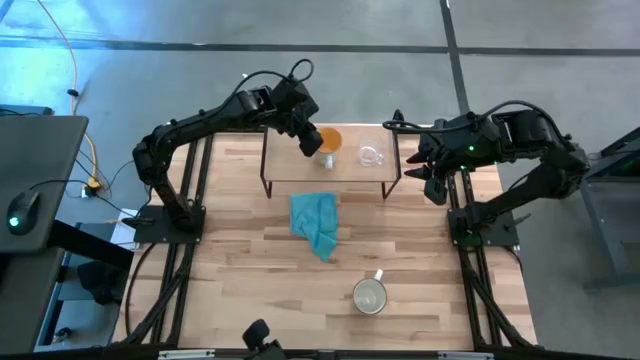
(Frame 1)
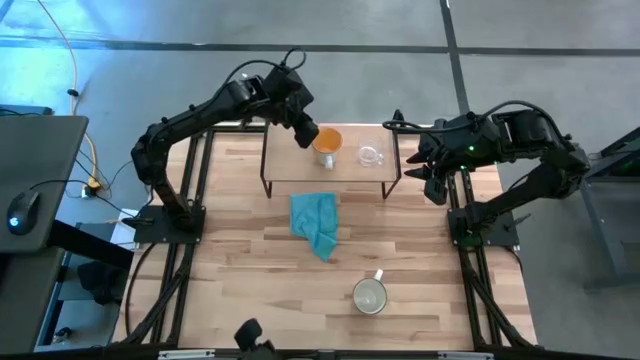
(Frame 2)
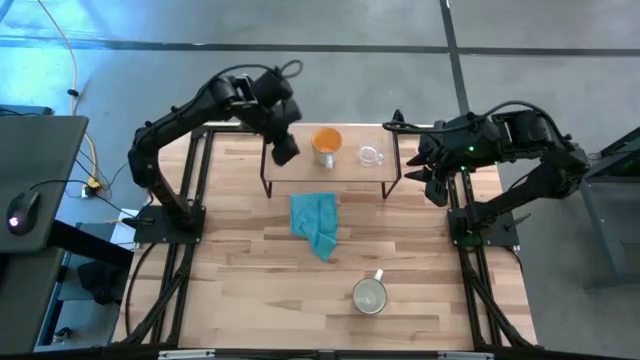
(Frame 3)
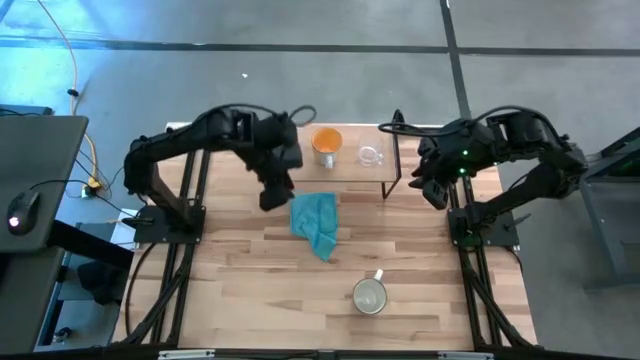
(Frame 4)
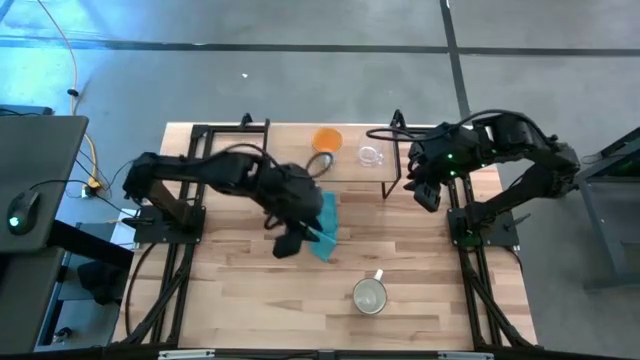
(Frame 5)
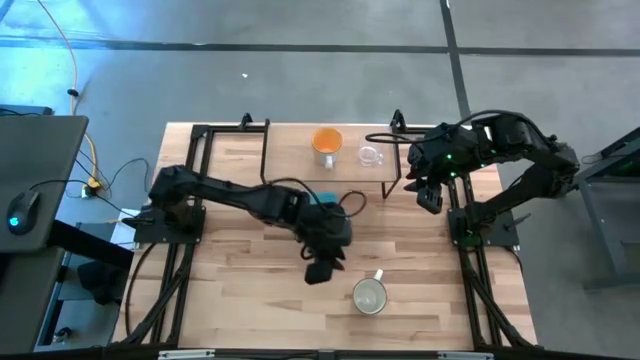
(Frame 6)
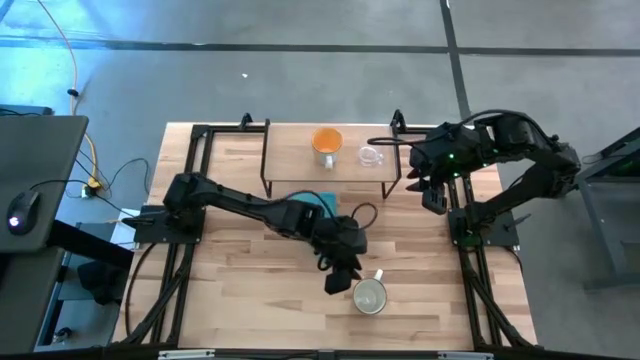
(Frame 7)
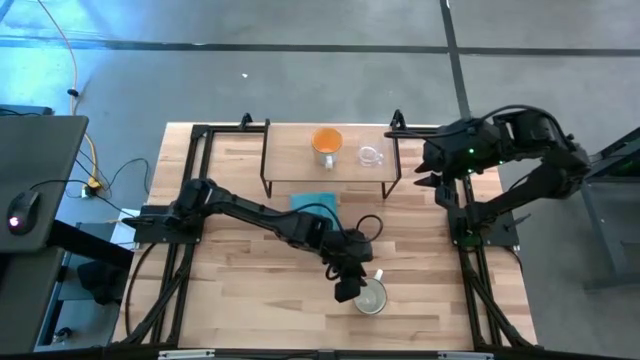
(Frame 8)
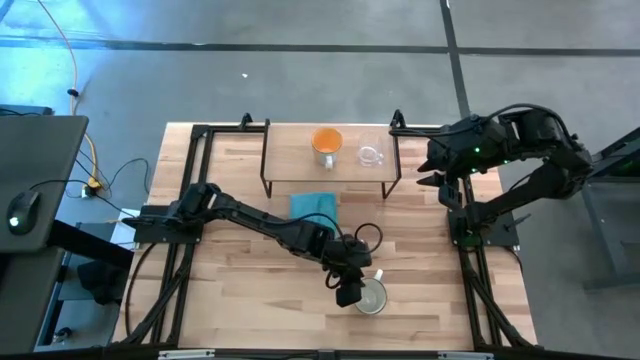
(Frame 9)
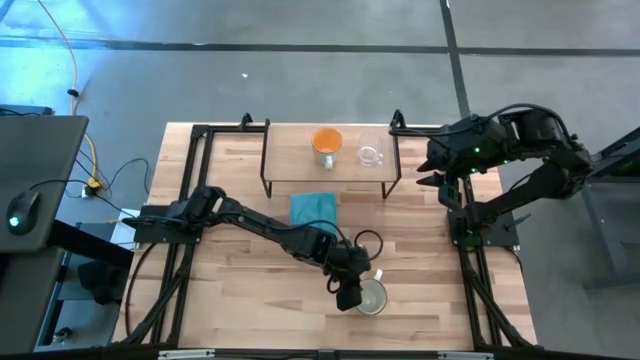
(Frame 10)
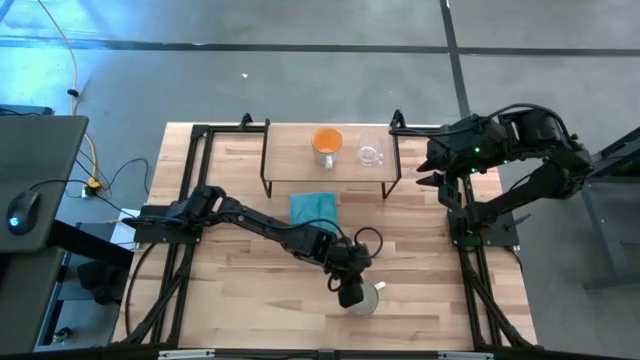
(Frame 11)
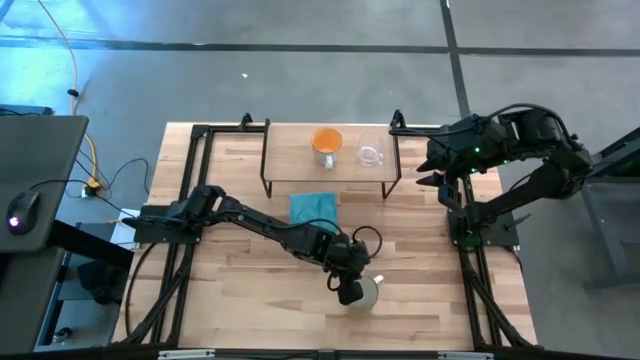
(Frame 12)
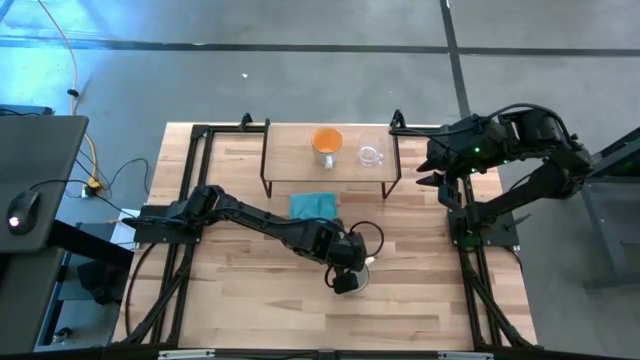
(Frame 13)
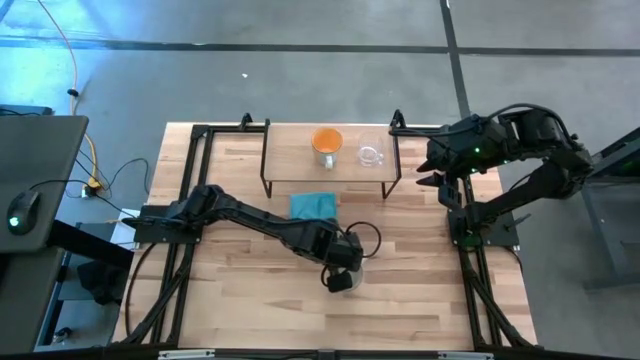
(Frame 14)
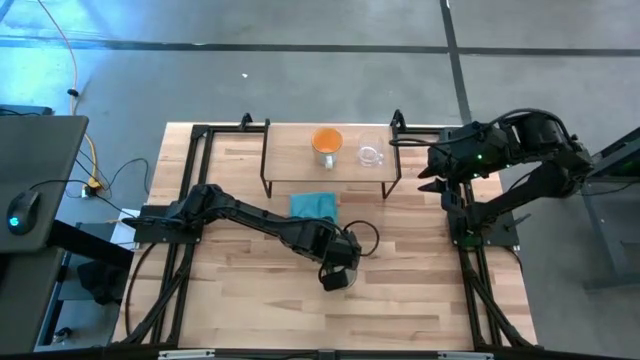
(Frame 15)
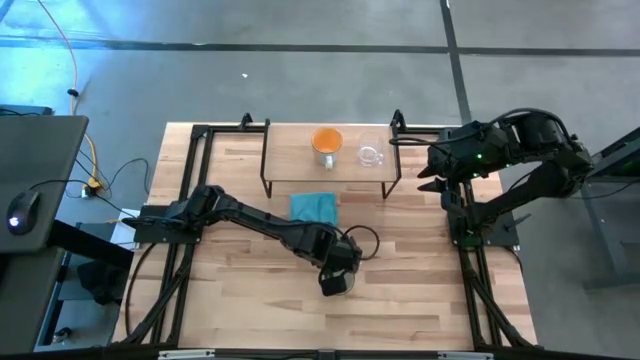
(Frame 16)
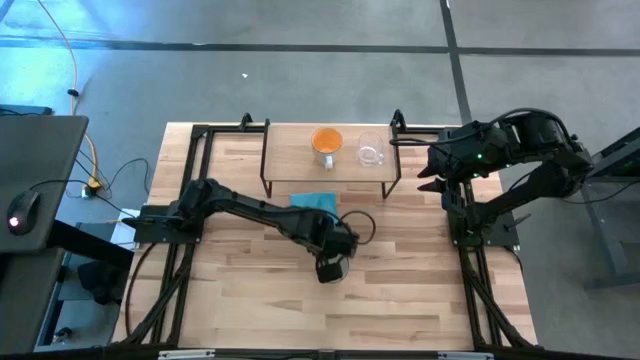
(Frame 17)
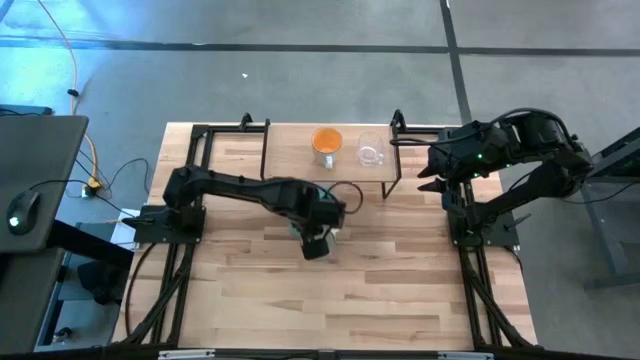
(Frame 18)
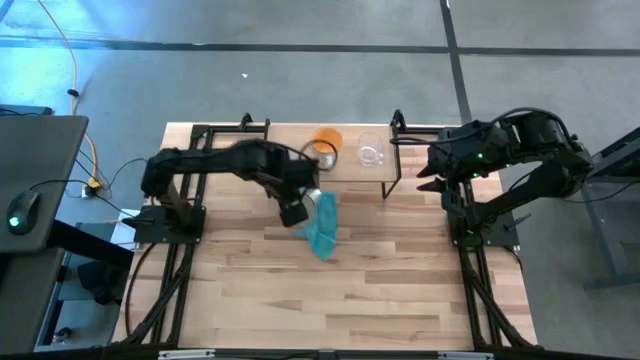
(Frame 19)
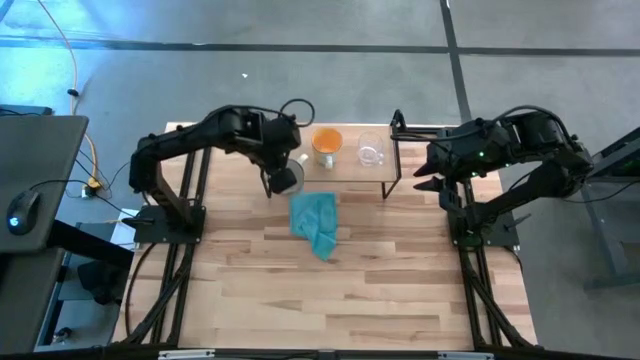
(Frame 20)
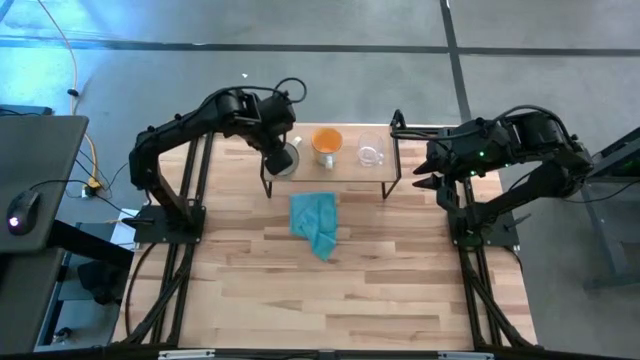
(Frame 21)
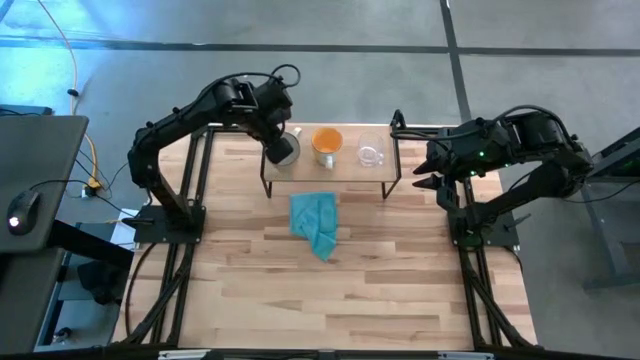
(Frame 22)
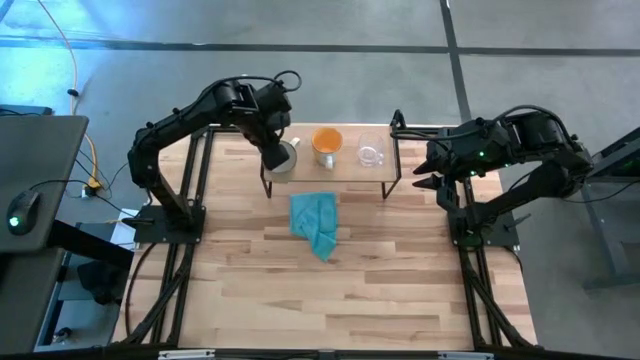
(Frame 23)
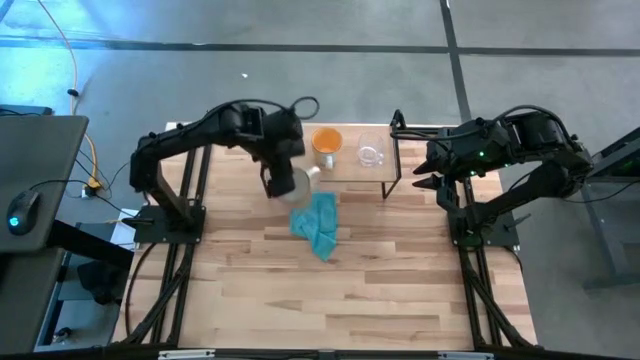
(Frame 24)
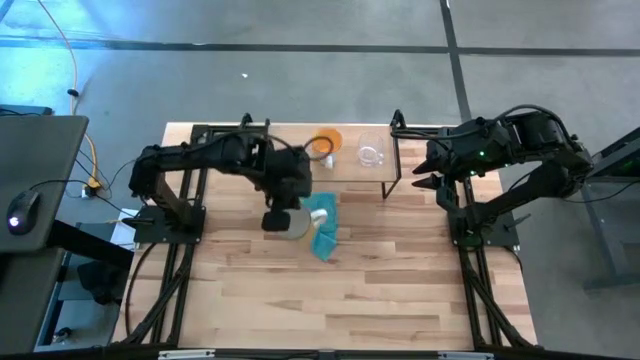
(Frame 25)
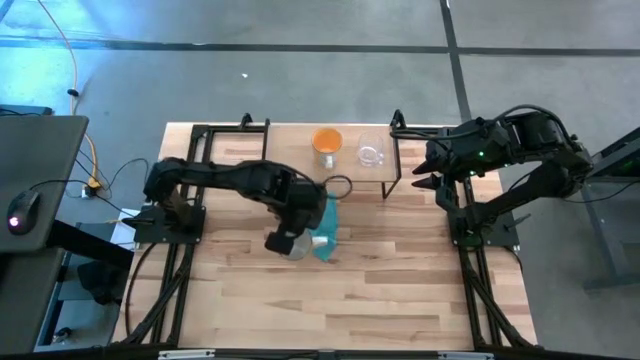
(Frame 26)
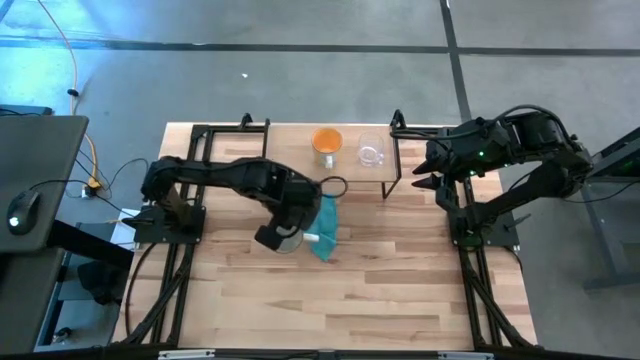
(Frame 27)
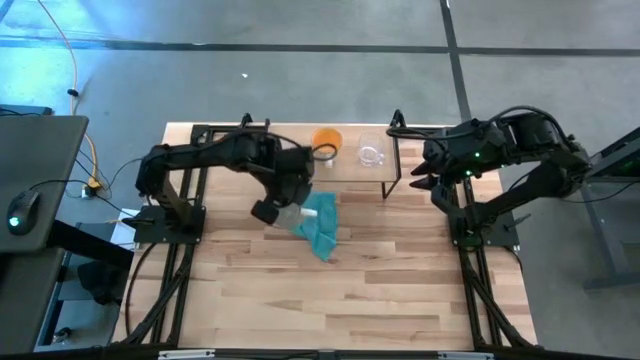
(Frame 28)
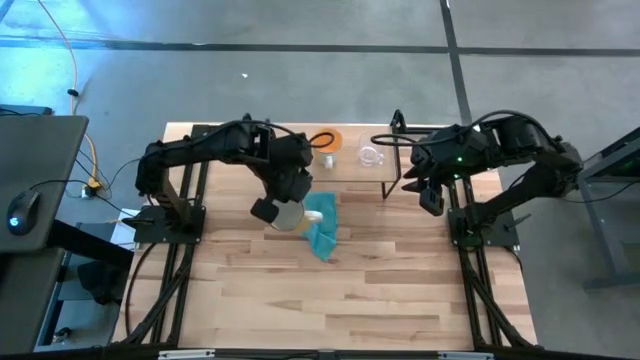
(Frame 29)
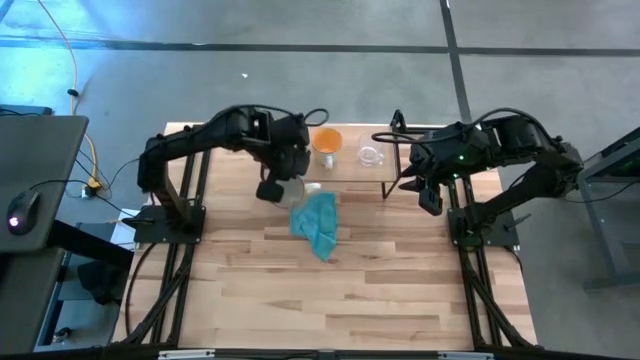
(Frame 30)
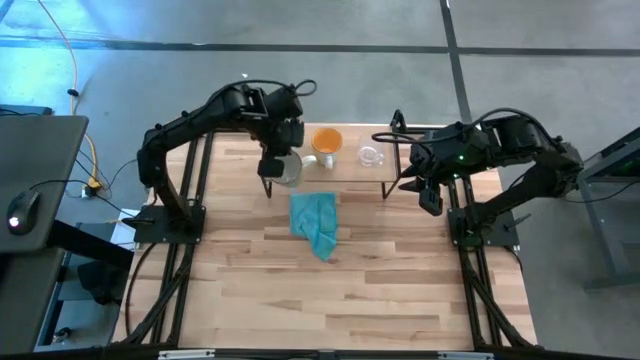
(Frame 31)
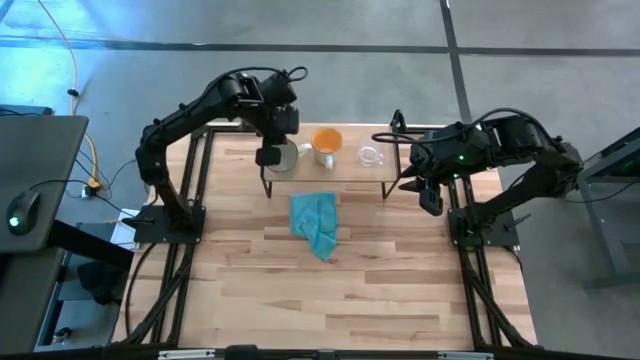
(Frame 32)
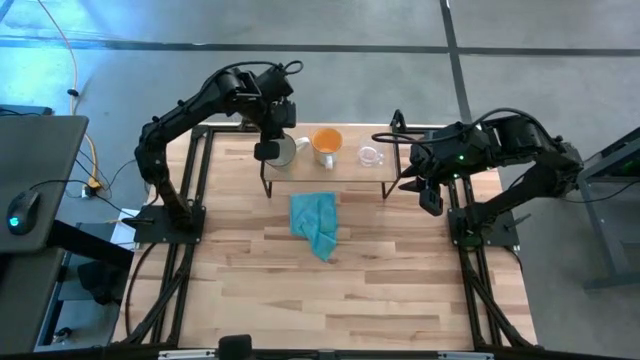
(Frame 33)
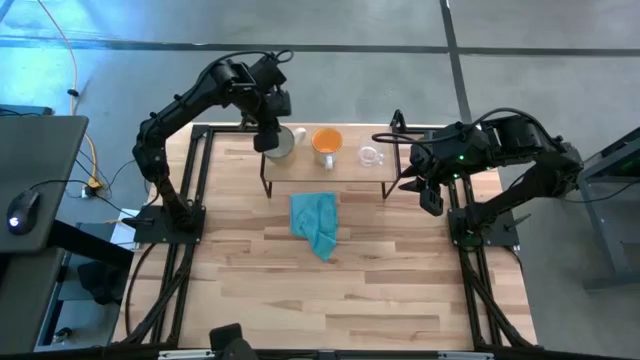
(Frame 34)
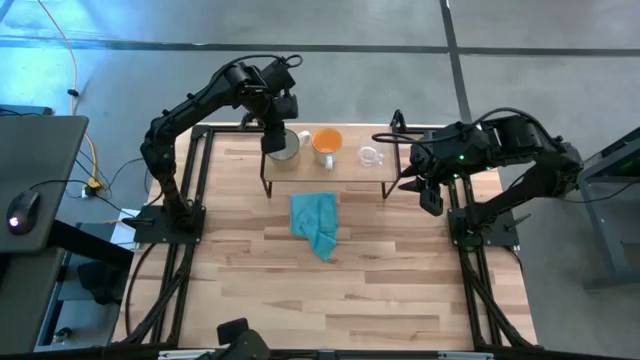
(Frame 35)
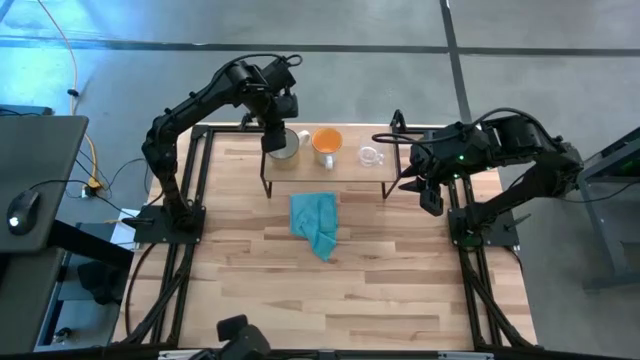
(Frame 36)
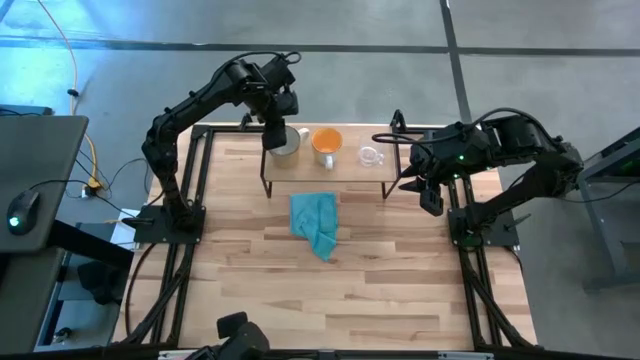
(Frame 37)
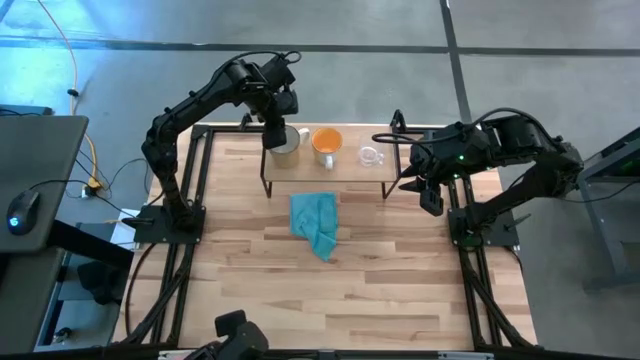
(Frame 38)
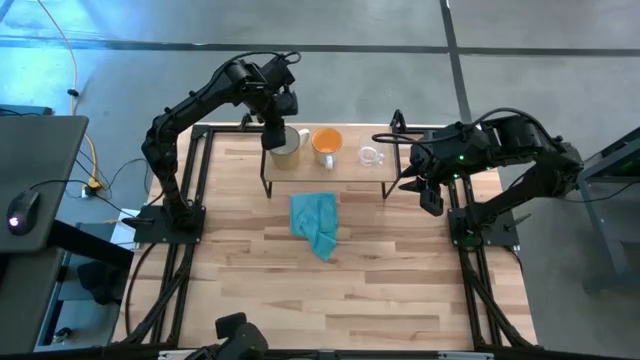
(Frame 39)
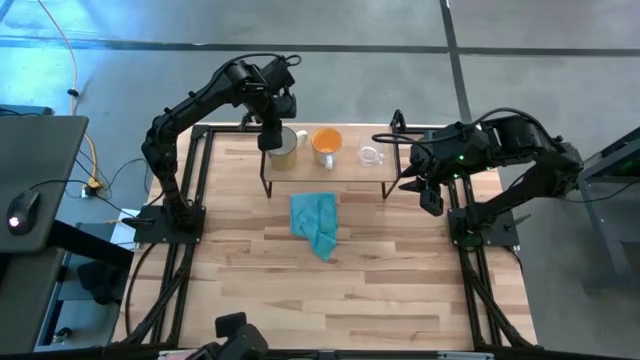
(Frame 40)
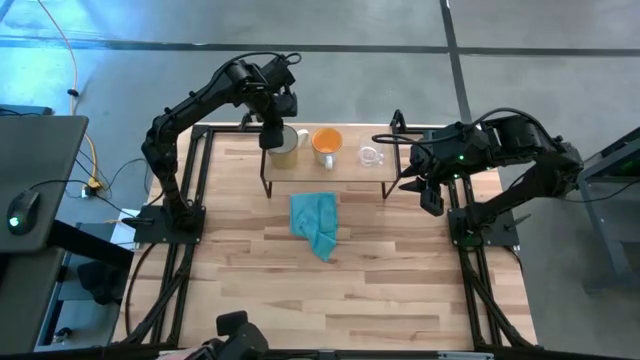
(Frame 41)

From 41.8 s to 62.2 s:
Task: Stack small to large cups/mugs on shelf
Put the white mug on the shelf
